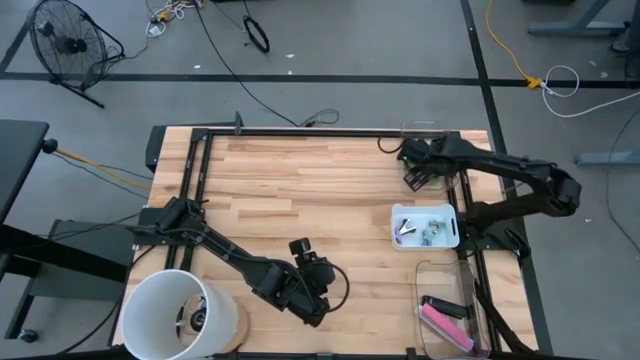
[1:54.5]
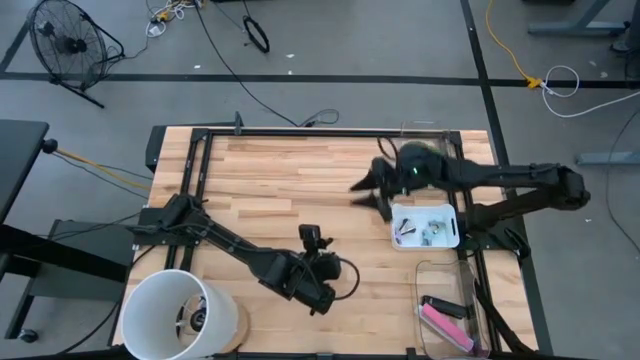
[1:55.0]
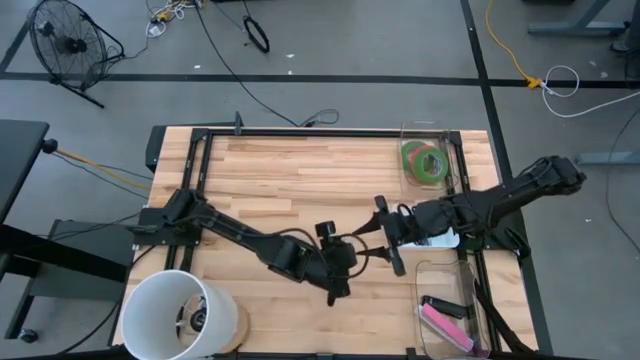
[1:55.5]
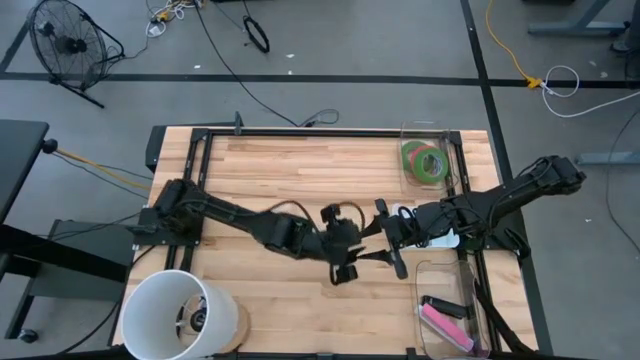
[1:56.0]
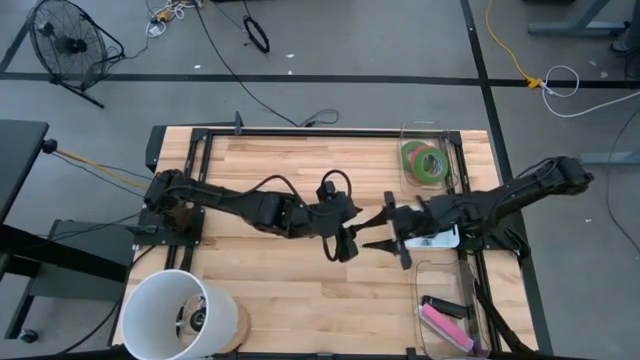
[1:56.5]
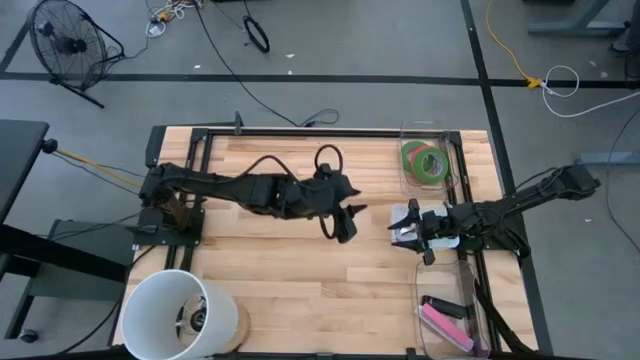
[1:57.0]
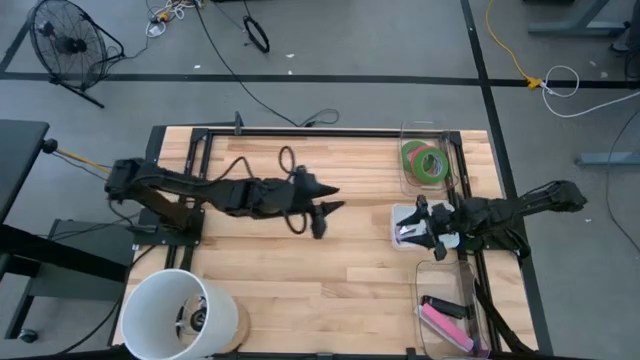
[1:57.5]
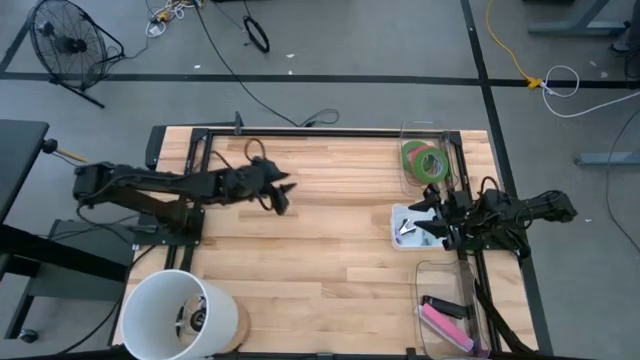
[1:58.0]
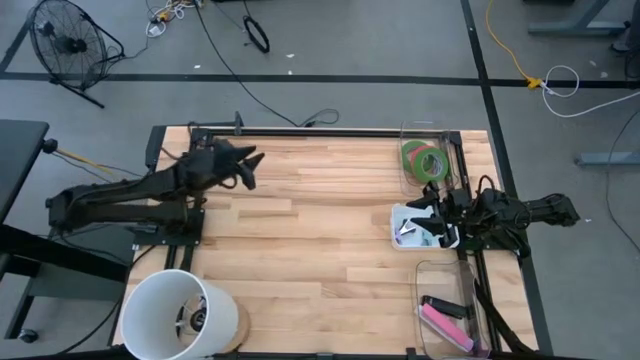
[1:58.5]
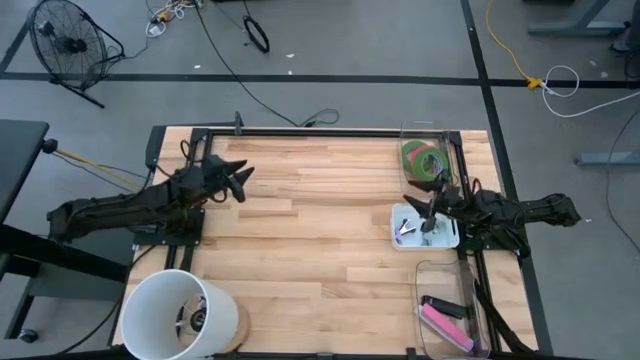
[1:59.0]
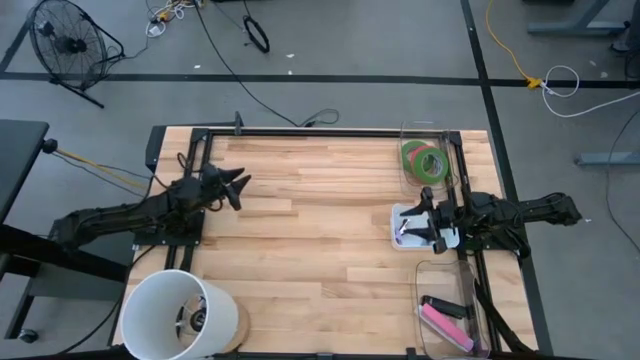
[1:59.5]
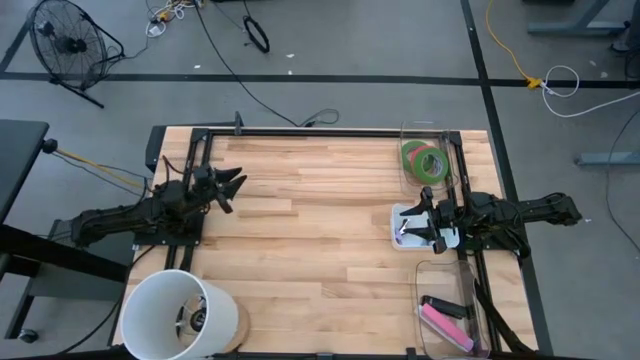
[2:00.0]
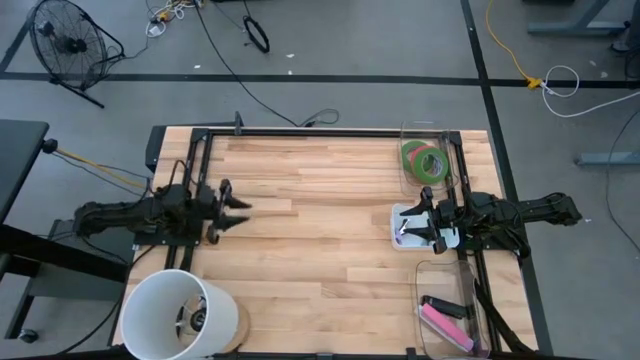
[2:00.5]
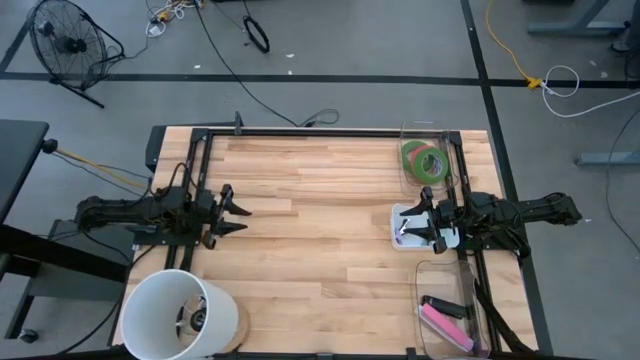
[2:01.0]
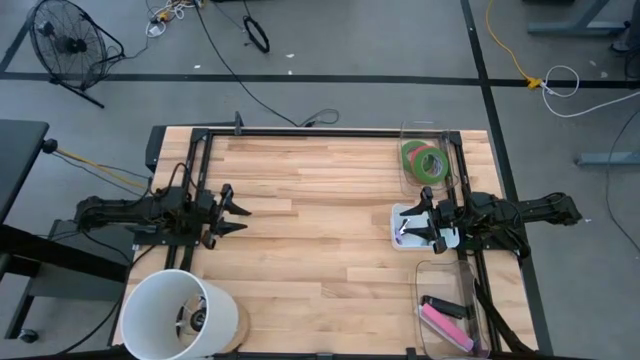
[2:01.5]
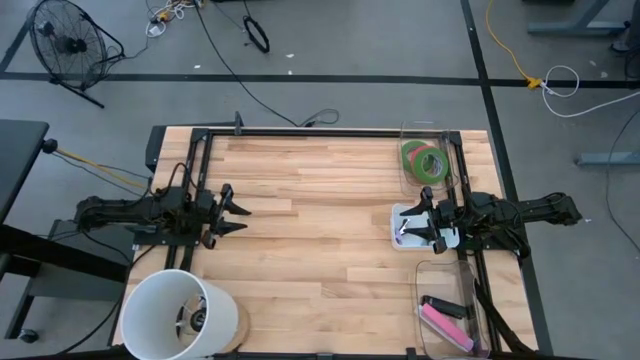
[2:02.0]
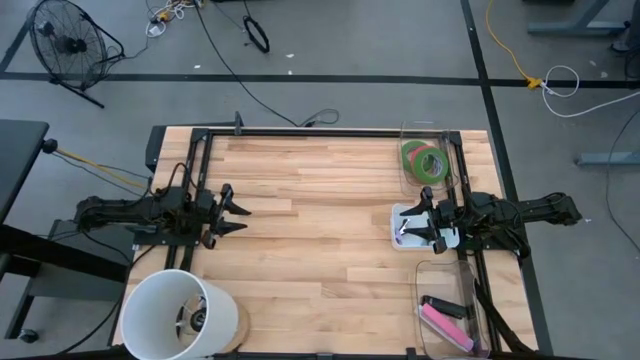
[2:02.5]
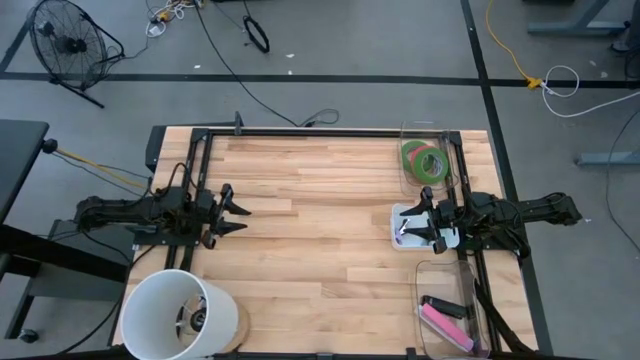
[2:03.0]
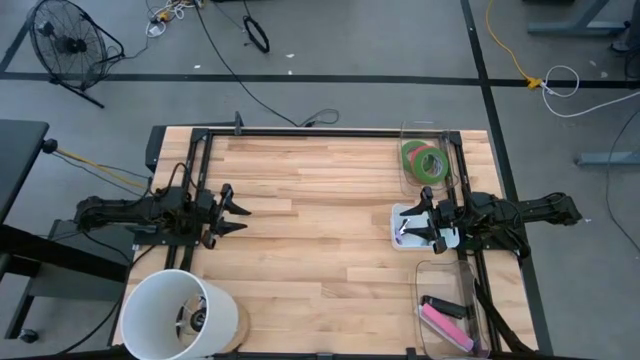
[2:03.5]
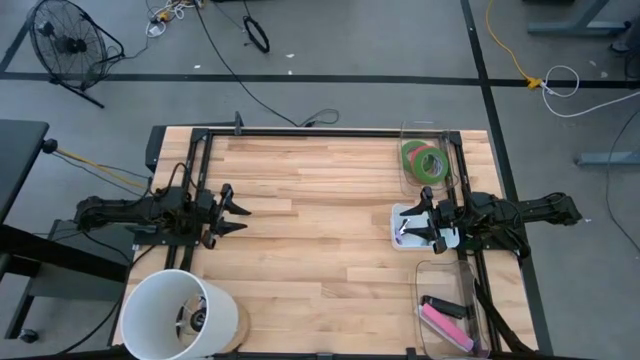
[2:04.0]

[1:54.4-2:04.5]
Task: Pick and place Stapler, Stapler remover, tape
Return to Home Position

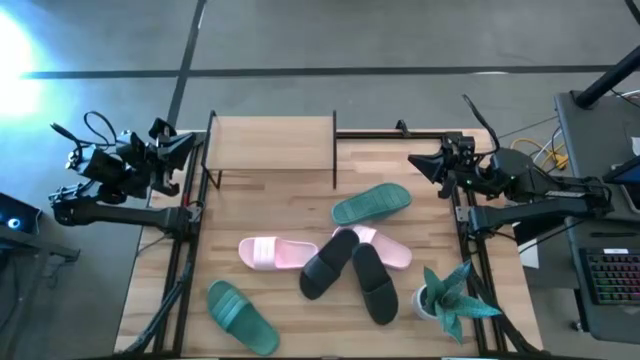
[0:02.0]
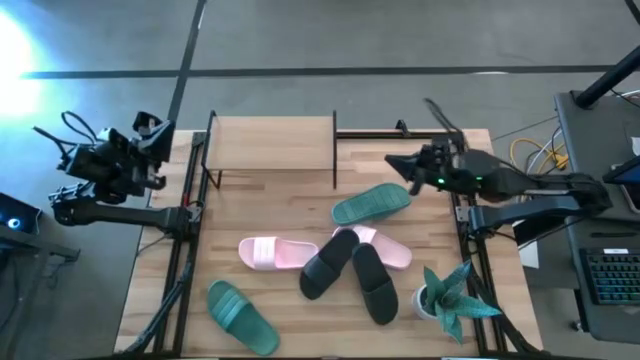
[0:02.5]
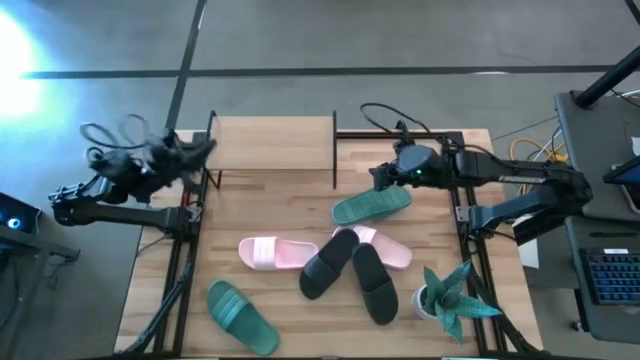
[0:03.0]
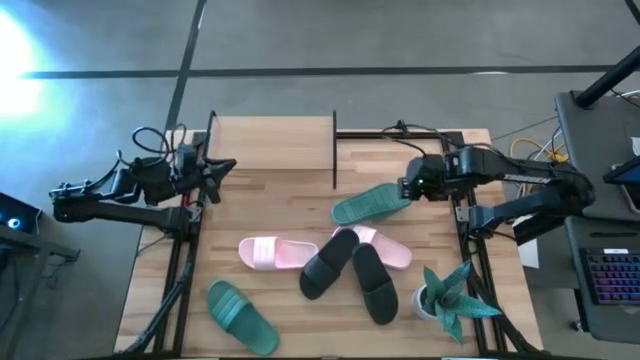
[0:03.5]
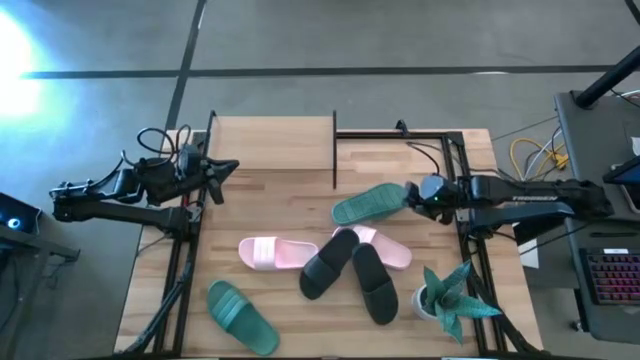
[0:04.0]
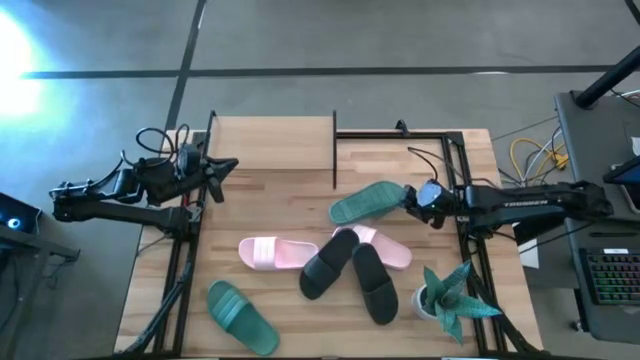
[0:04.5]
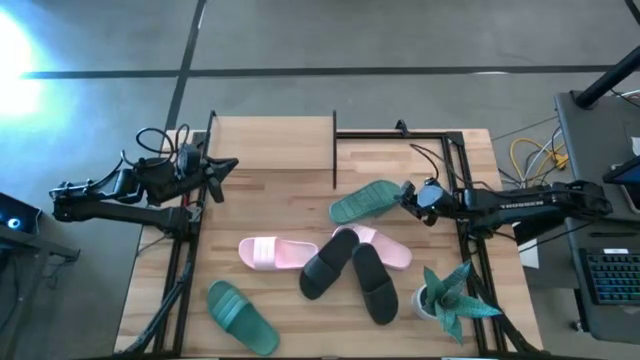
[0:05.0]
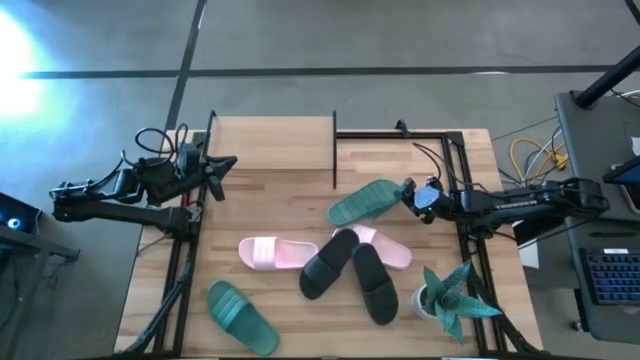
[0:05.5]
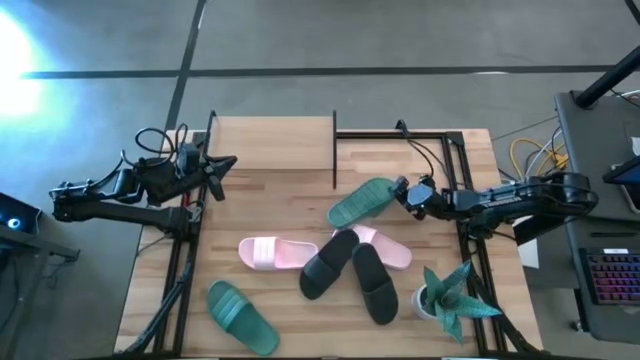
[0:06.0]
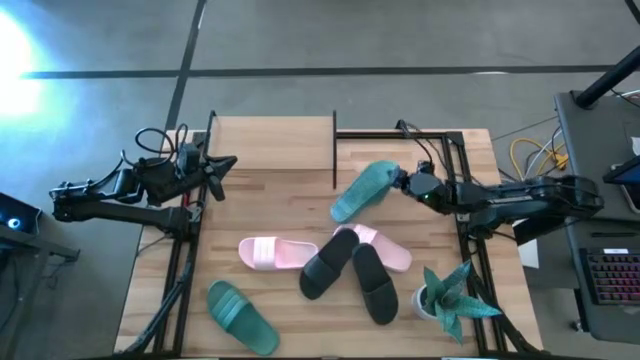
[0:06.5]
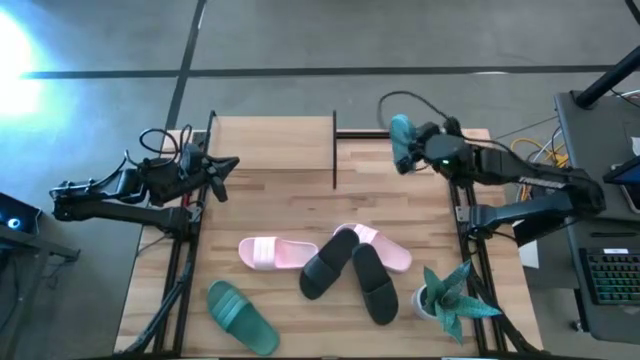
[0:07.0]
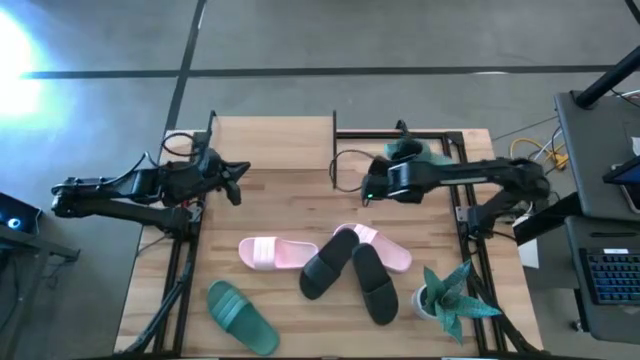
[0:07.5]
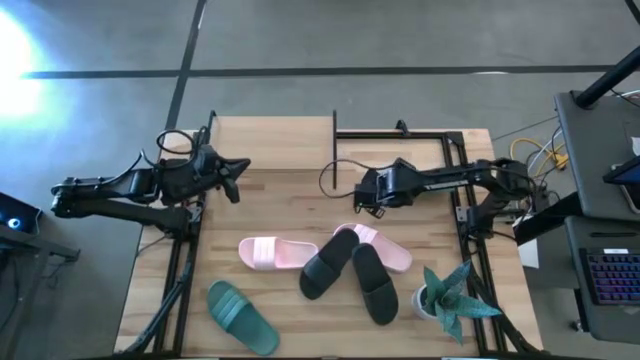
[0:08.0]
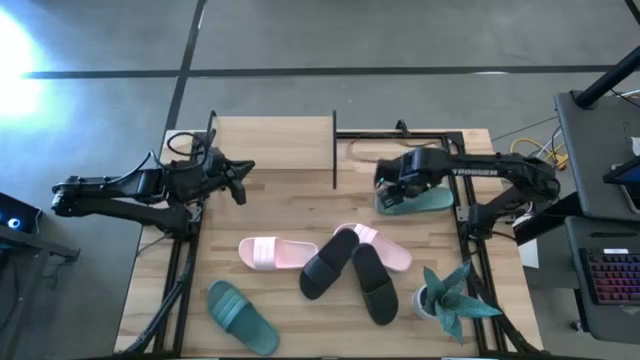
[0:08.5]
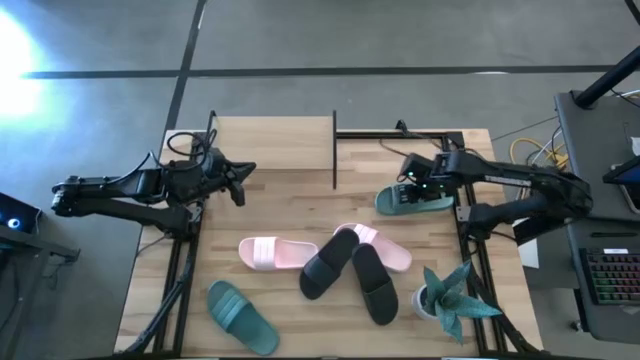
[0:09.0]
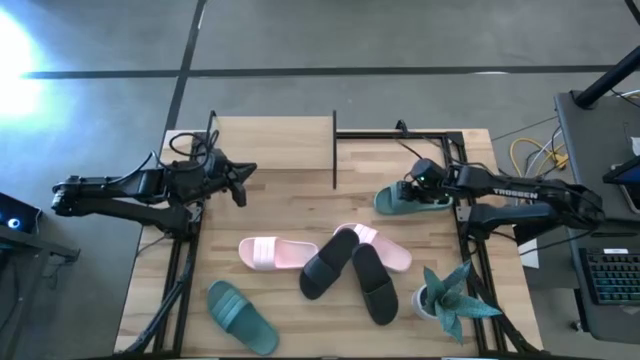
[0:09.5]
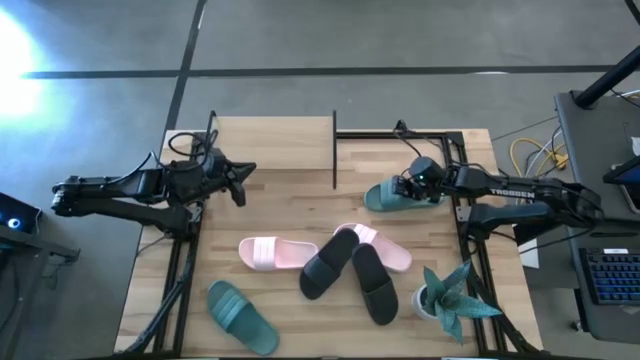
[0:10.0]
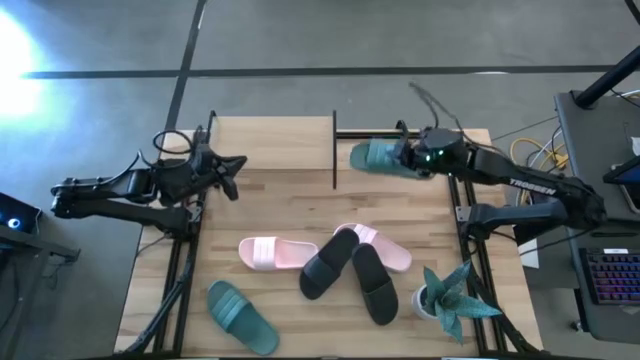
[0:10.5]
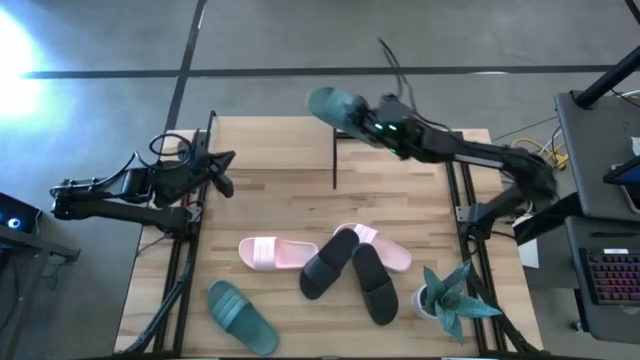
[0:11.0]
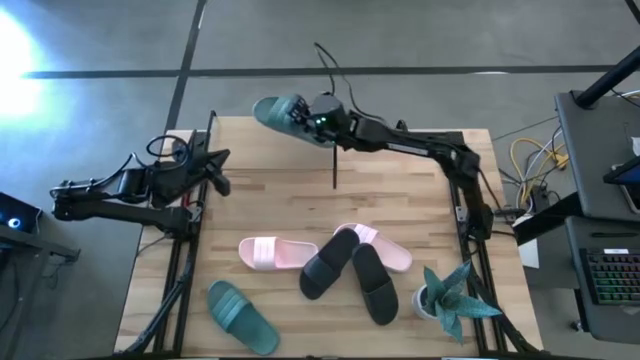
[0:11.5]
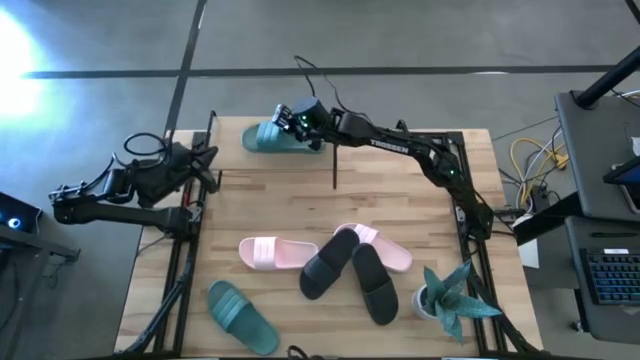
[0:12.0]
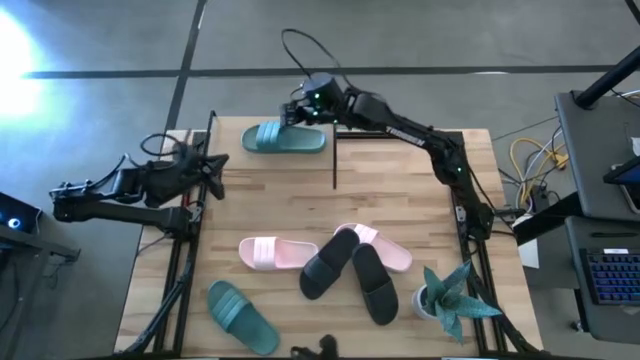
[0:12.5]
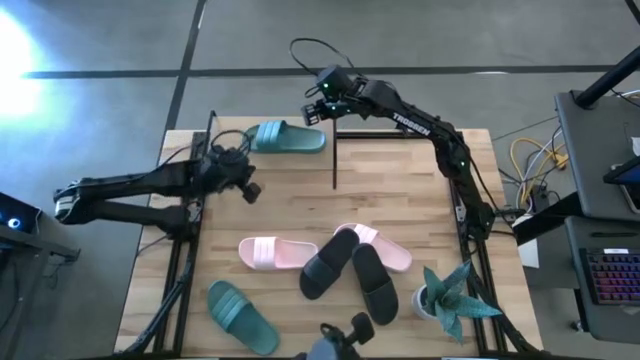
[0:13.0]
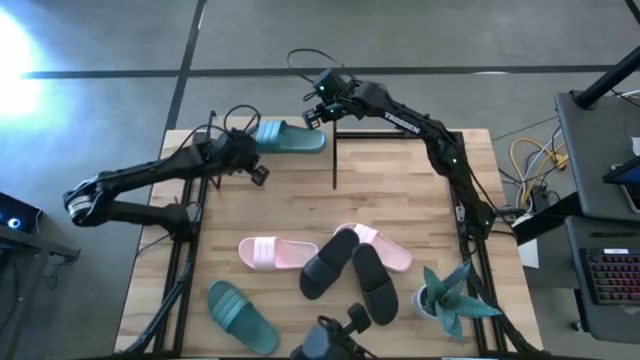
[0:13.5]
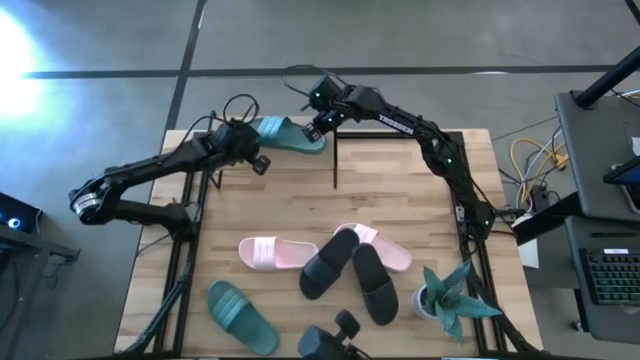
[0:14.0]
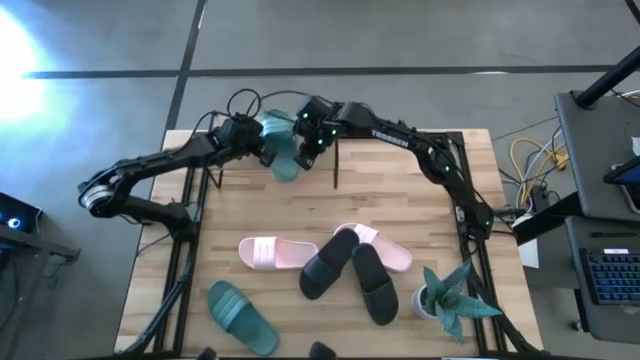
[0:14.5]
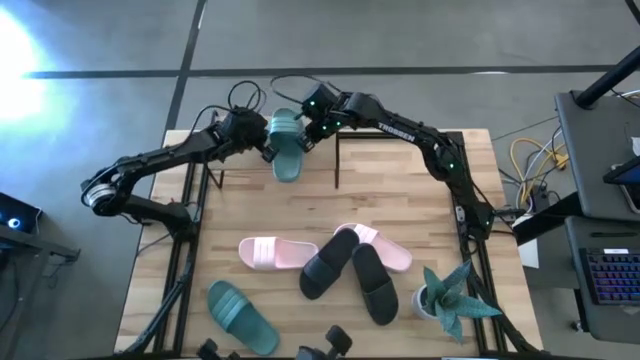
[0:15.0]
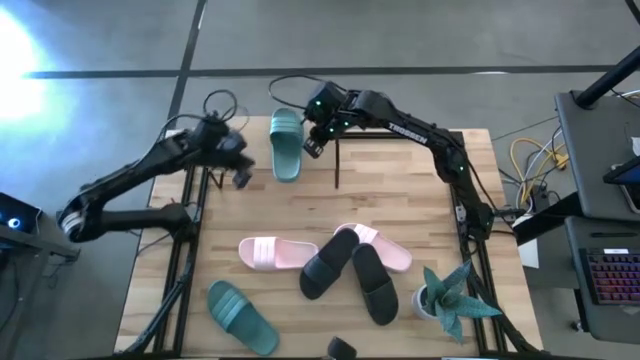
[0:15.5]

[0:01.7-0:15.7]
Task: Pick and place slides into the shelf
Put the top green slide on the shelf
